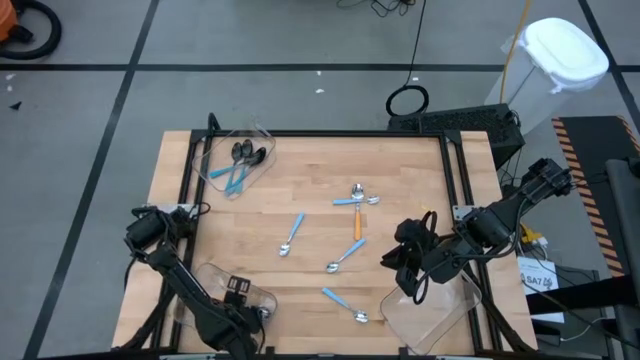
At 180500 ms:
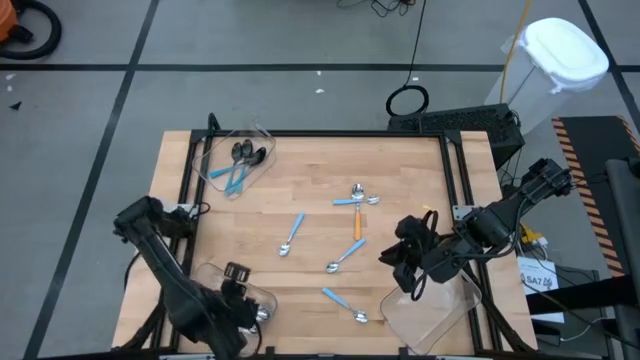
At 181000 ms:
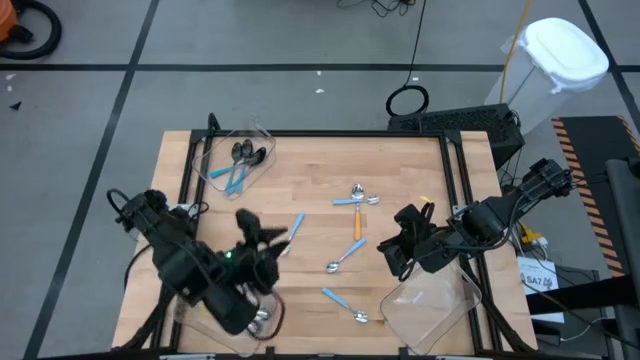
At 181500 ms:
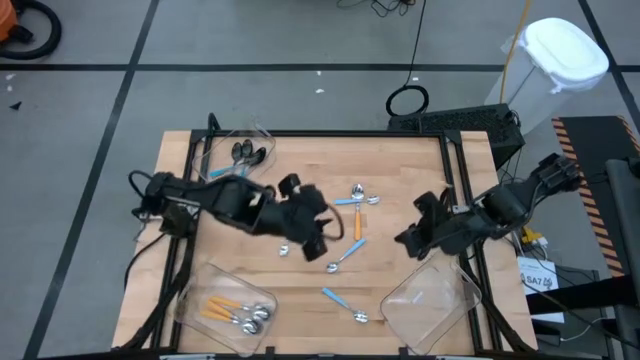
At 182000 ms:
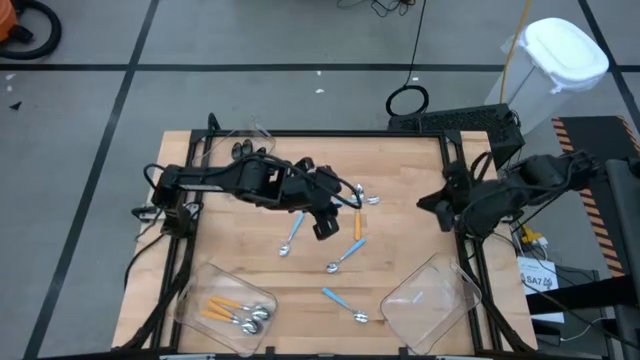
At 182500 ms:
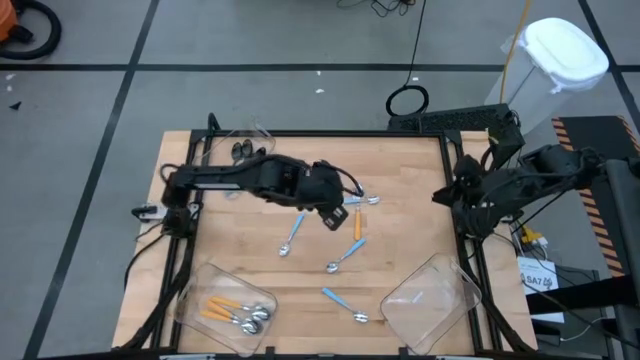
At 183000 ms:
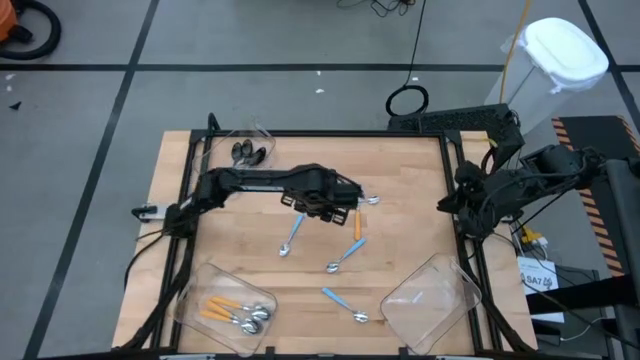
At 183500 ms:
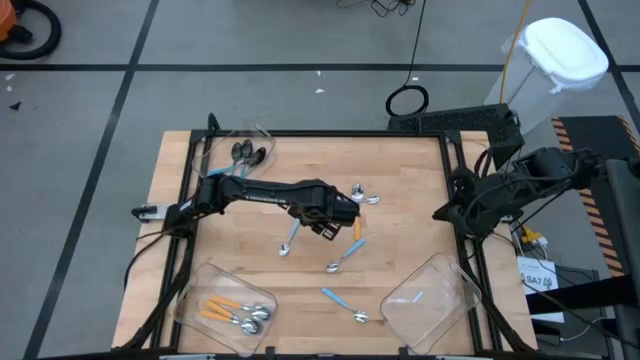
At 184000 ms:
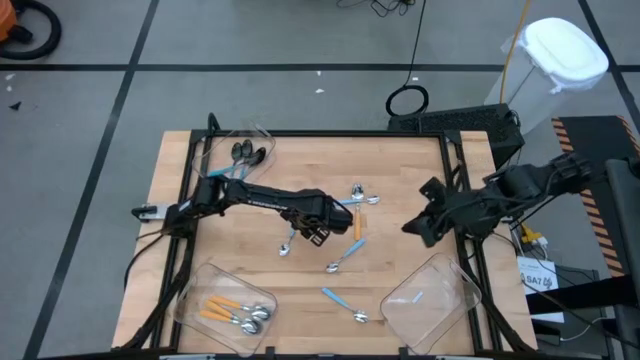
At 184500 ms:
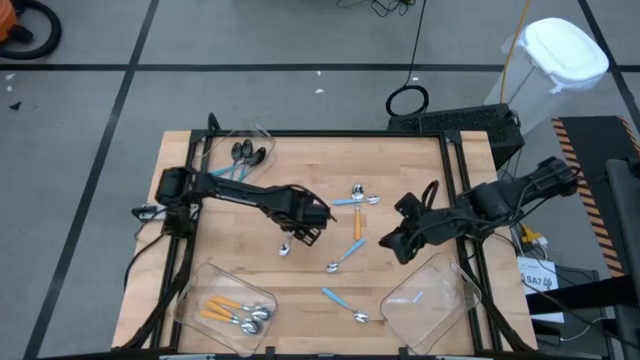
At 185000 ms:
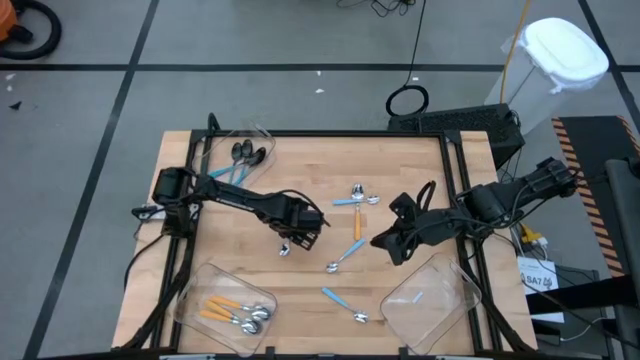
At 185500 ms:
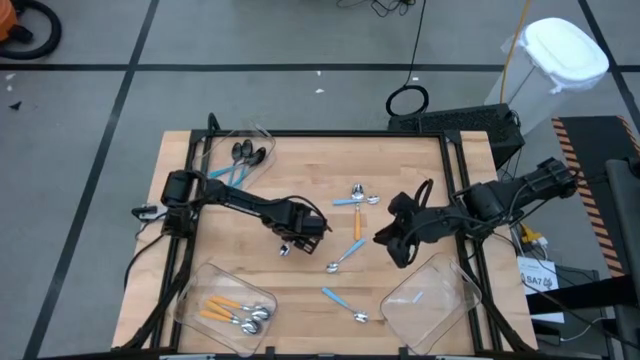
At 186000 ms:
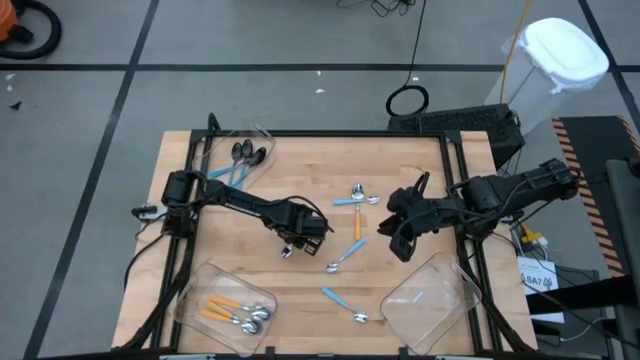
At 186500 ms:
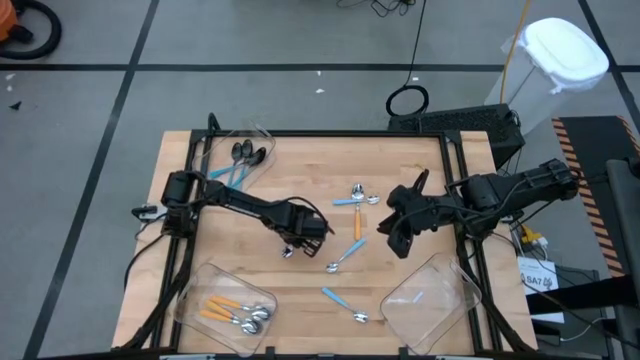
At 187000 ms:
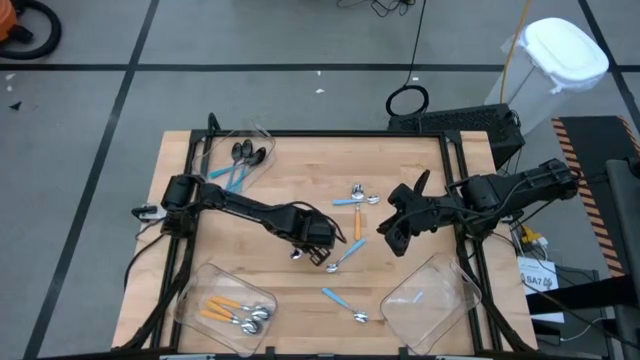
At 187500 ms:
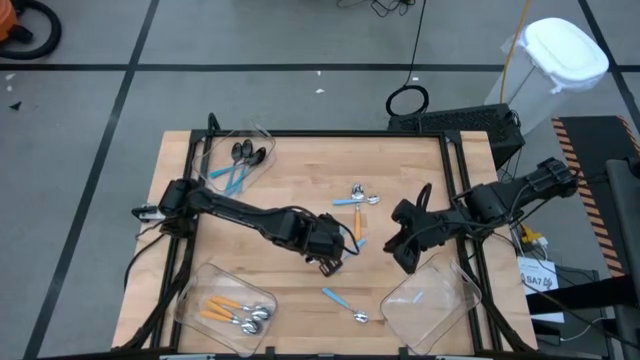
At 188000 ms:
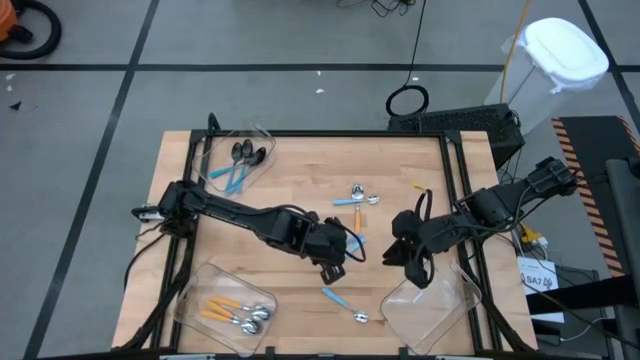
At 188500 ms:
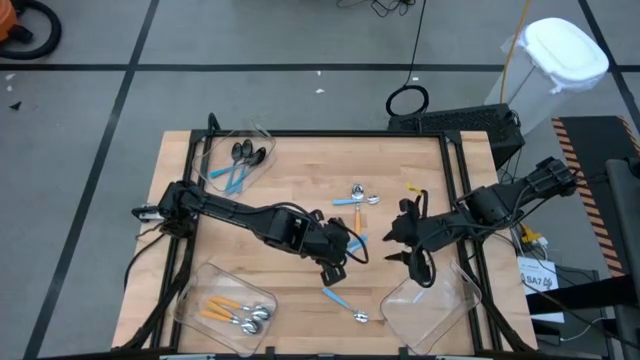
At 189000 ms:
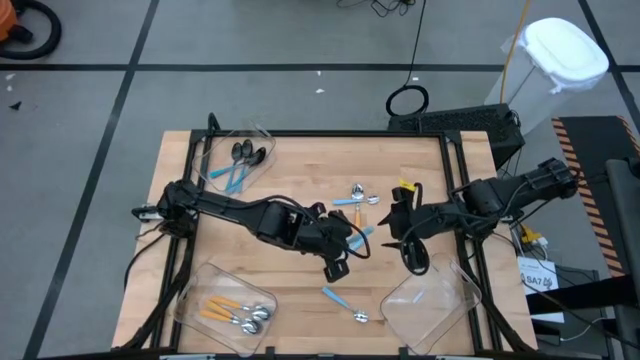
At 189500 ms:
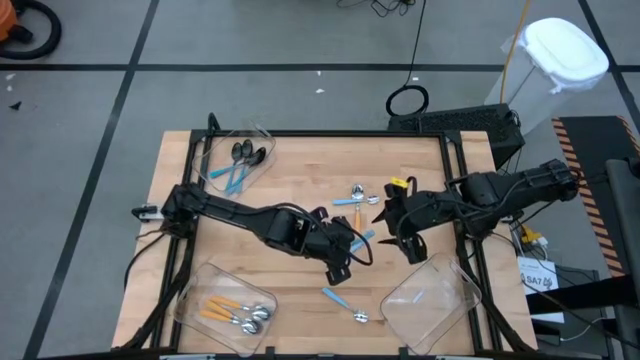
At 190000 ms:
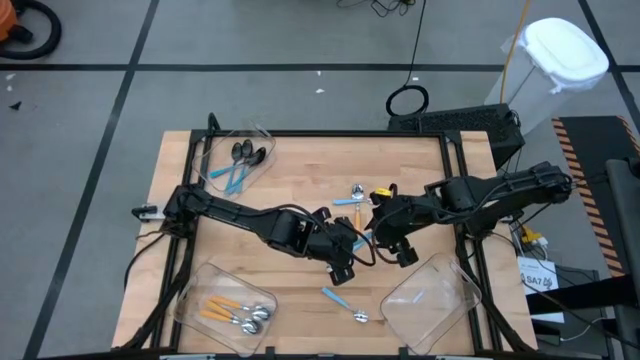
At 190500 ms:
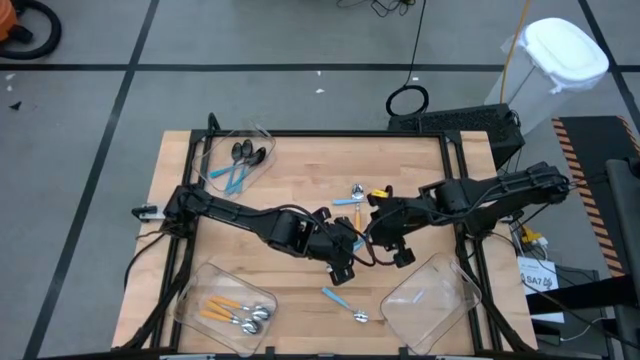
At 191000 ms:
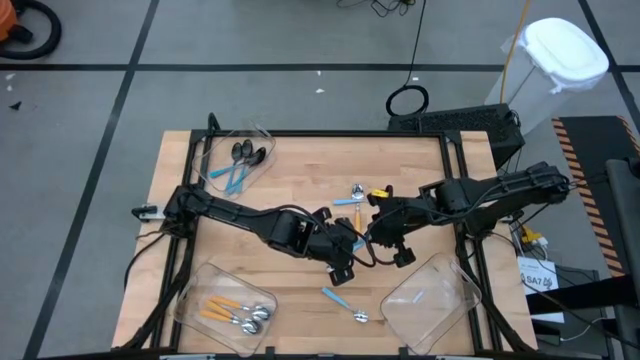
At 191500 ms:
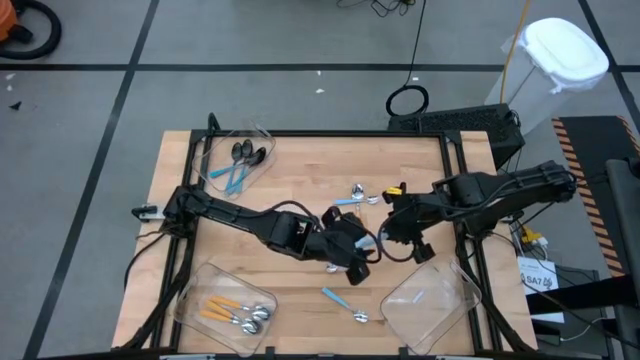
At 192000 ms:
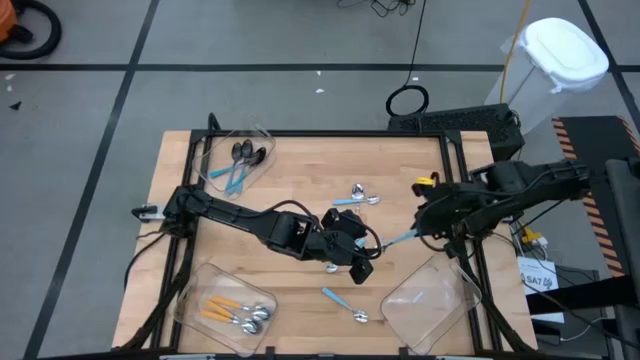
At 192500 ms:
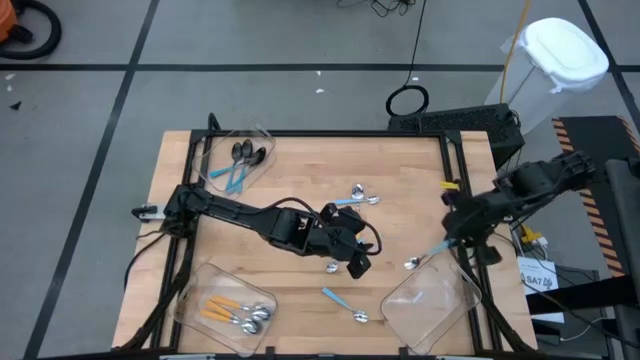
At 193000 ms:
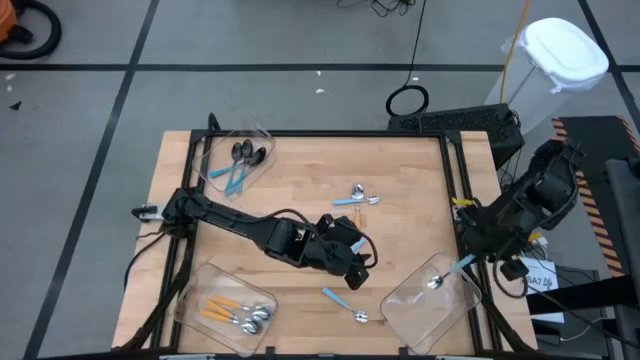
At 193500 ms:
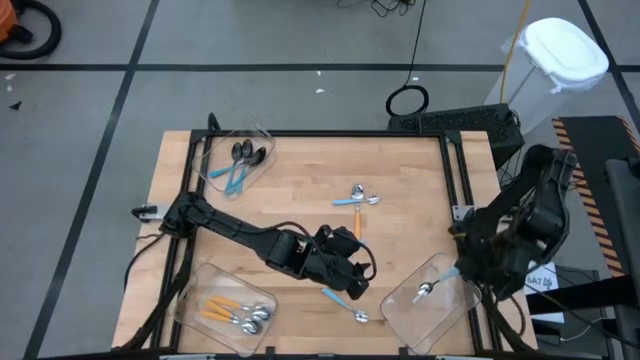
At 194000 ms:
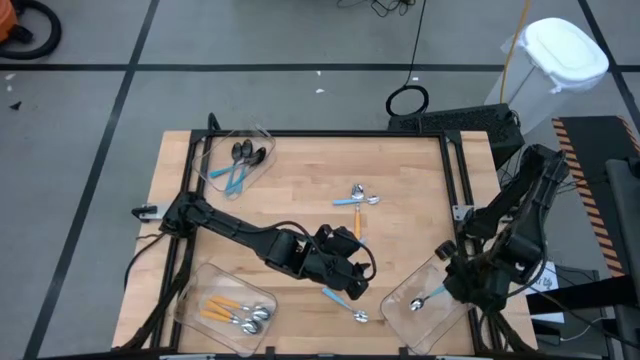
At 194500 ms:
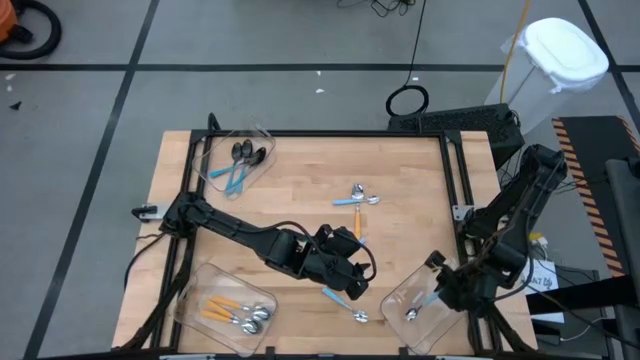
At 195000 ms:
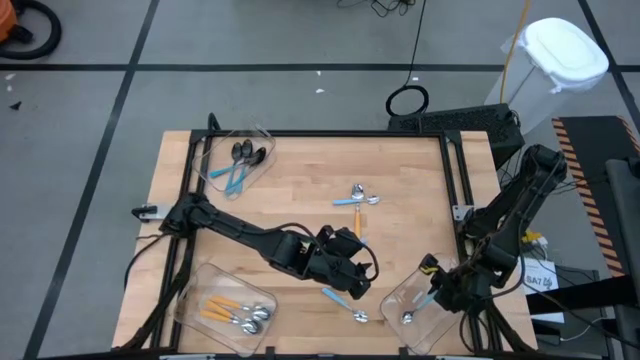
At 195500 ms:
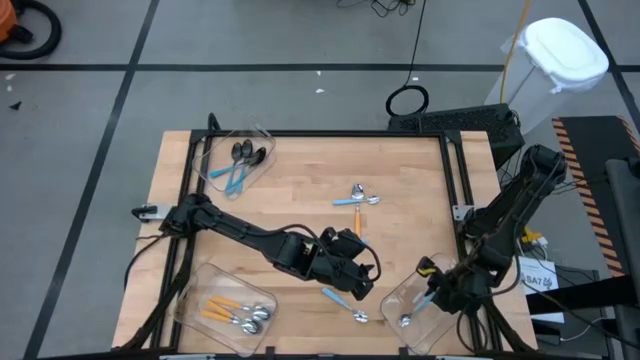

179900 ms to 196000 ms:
Task: Sort silverware by color (type)
Put the light blue spoon into the bottom right transparent bin

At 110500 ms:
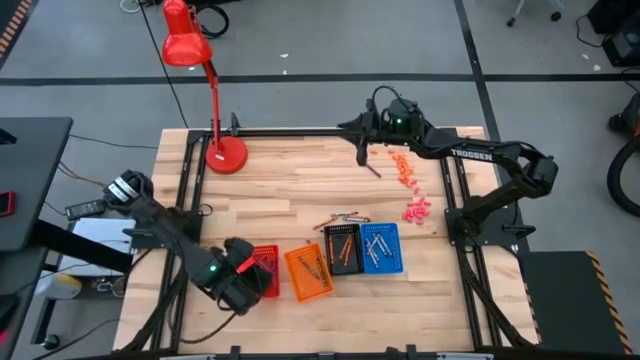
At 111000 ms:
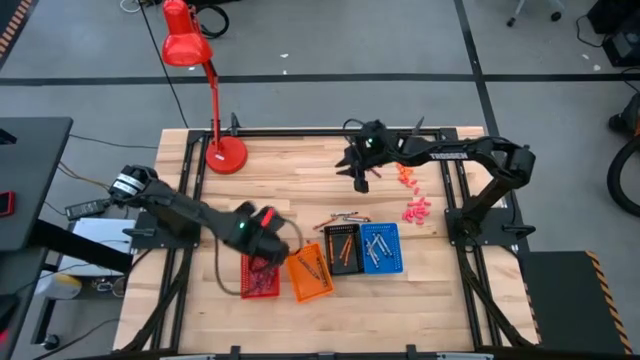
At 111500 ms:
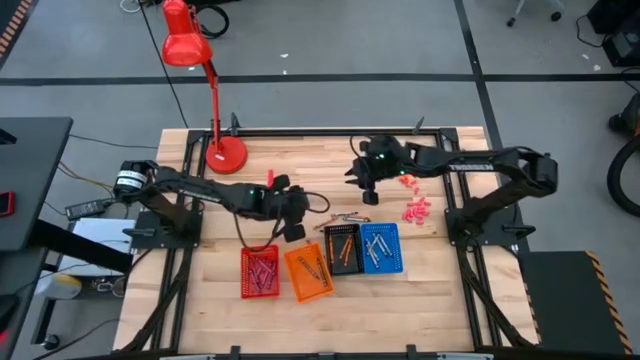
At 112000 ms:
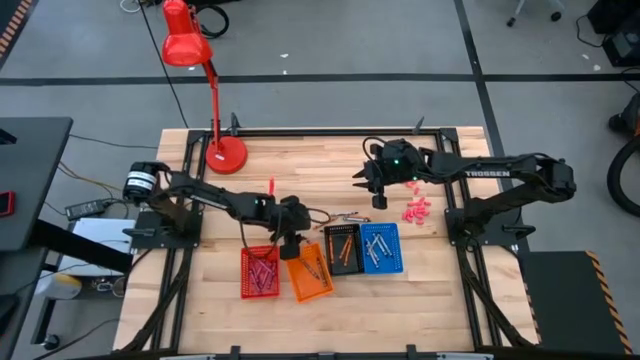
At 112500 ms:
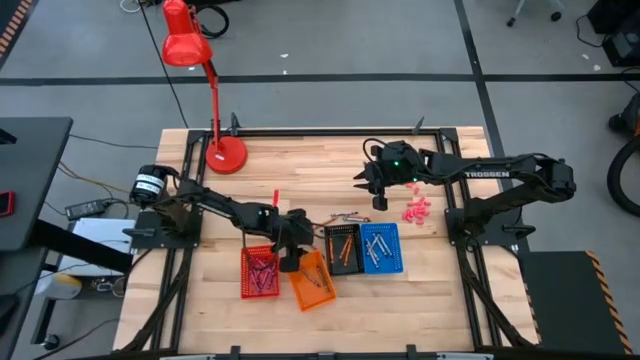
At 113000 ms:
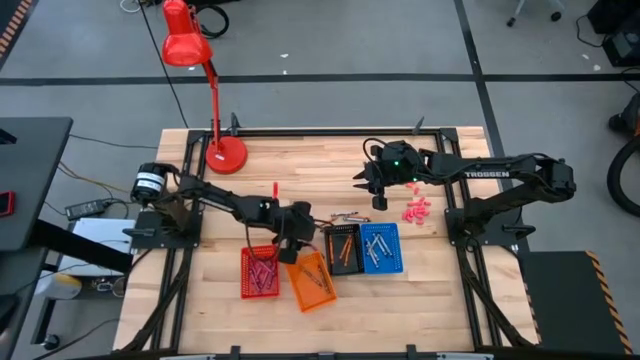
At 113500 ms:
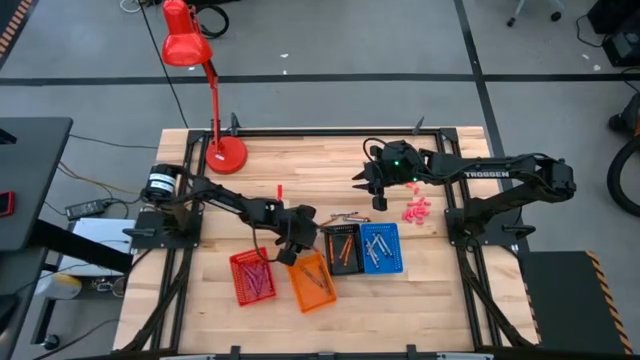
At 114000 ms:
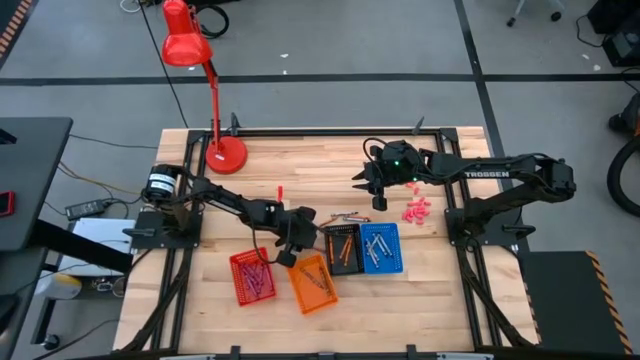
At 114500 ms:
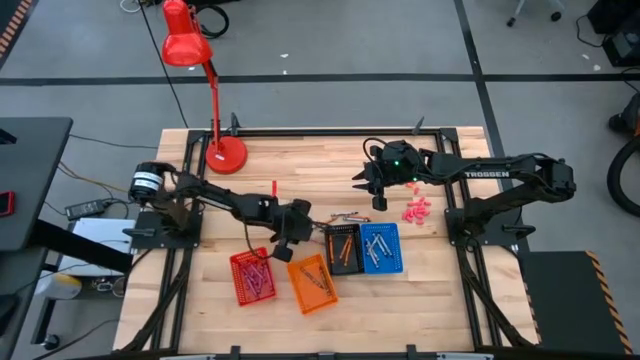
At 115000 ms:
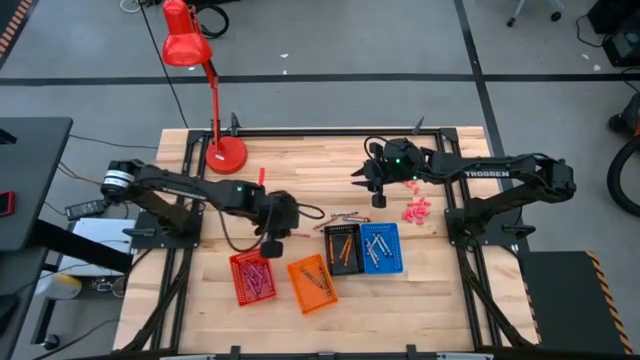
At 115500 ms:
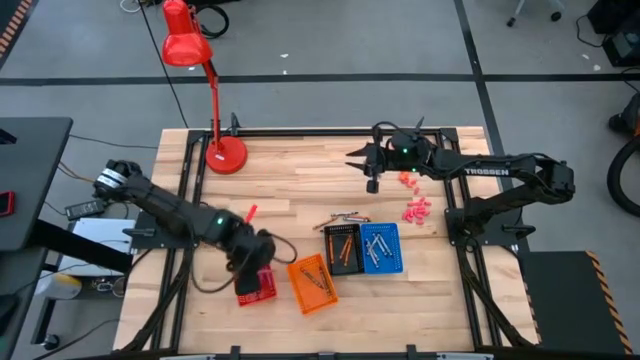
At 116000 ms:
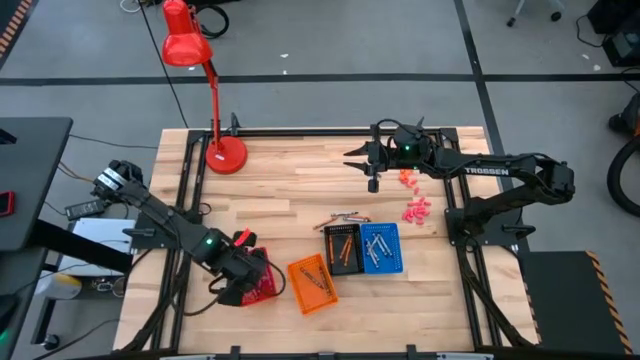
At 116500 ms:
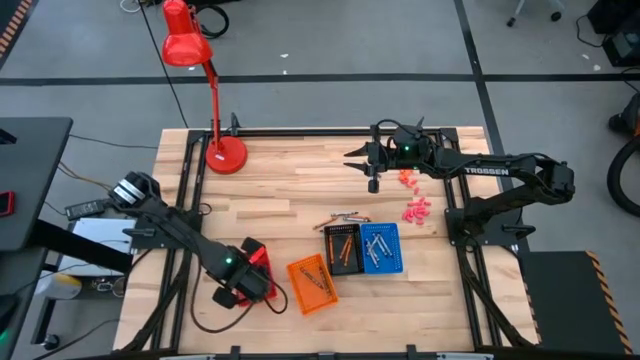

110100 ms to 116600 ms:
Task: Sort crayons
Put the pink crayon into the red bin
